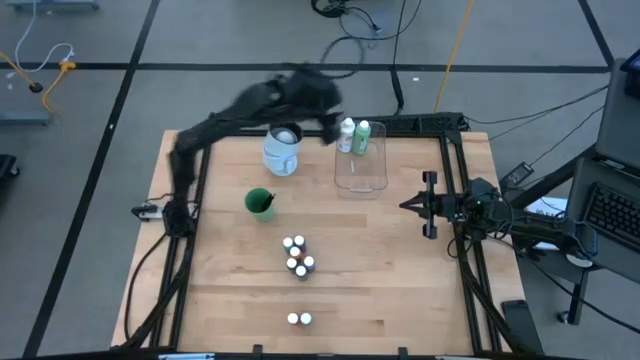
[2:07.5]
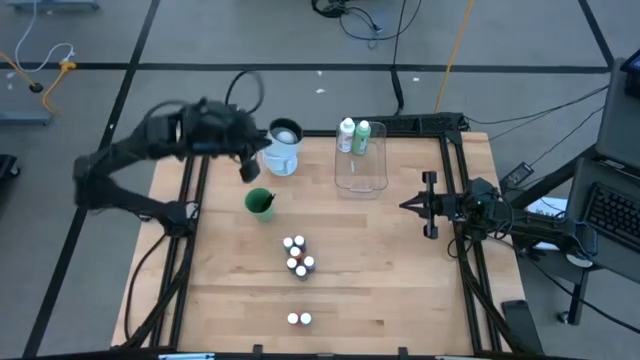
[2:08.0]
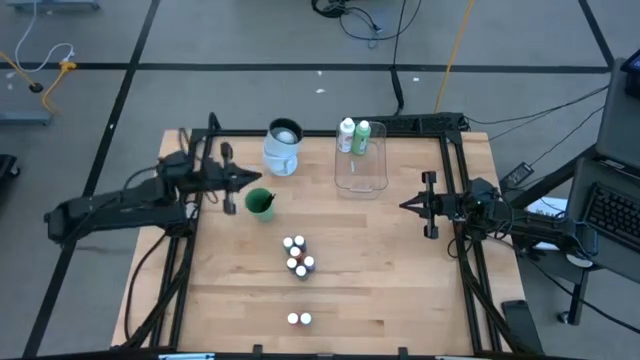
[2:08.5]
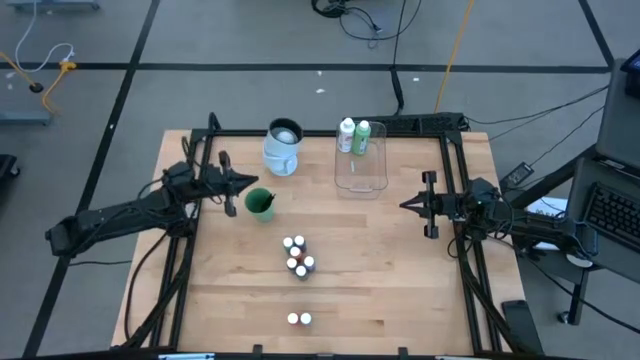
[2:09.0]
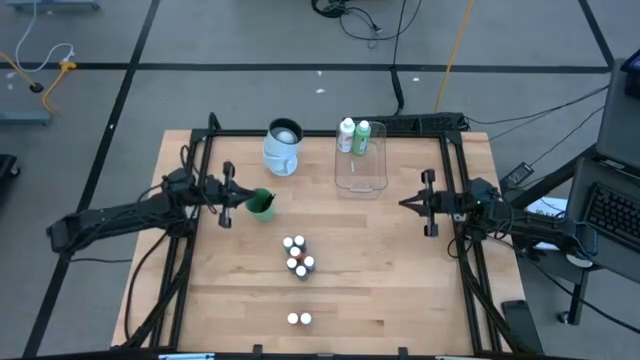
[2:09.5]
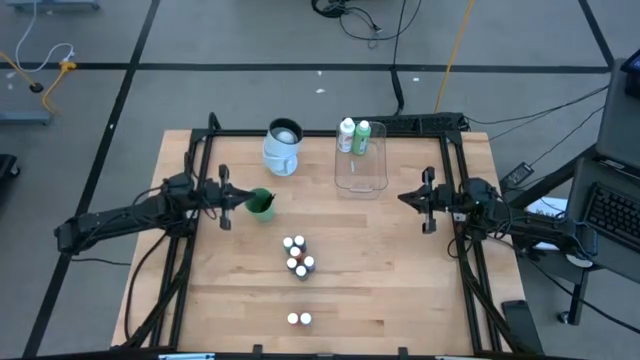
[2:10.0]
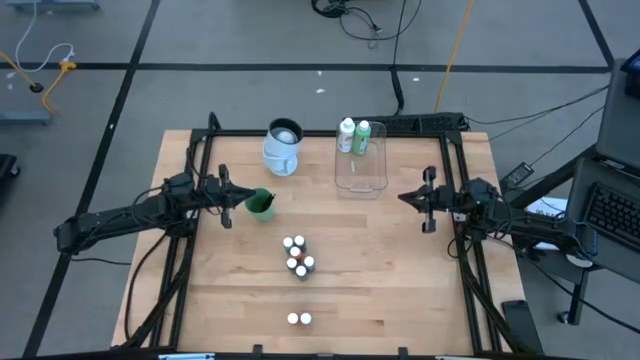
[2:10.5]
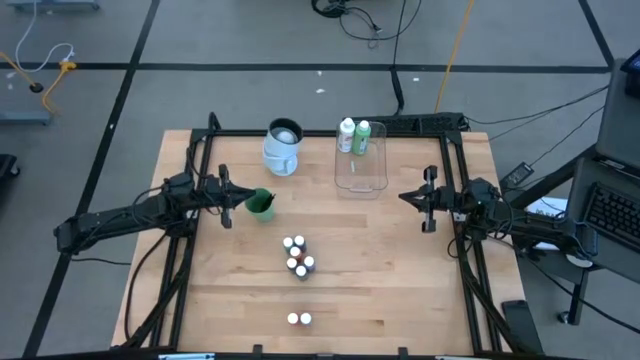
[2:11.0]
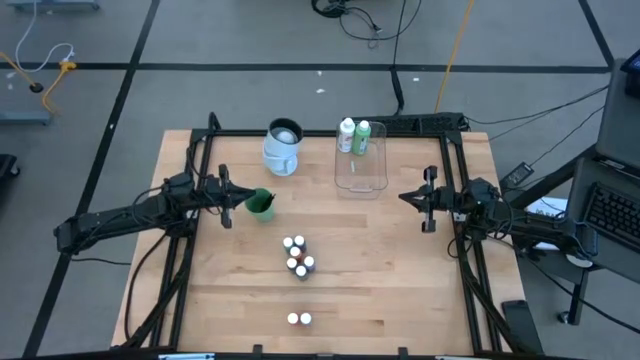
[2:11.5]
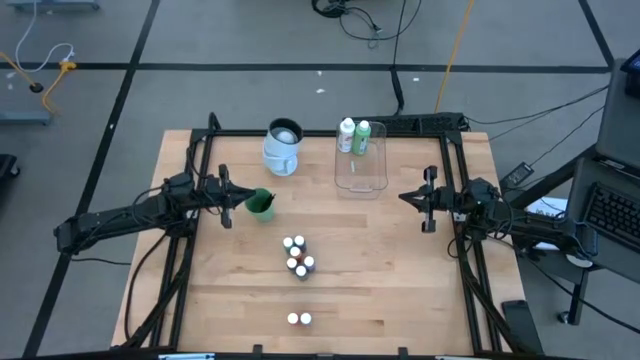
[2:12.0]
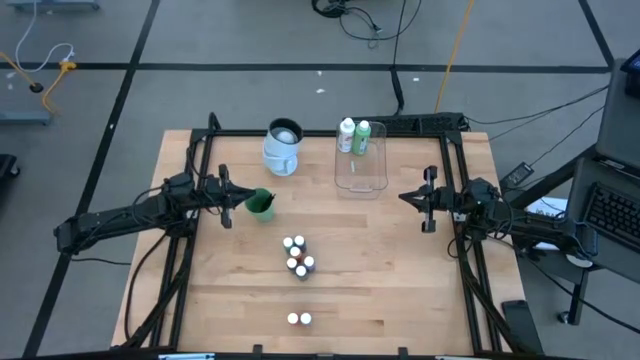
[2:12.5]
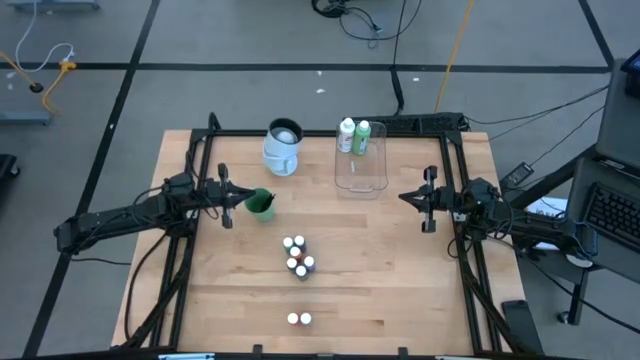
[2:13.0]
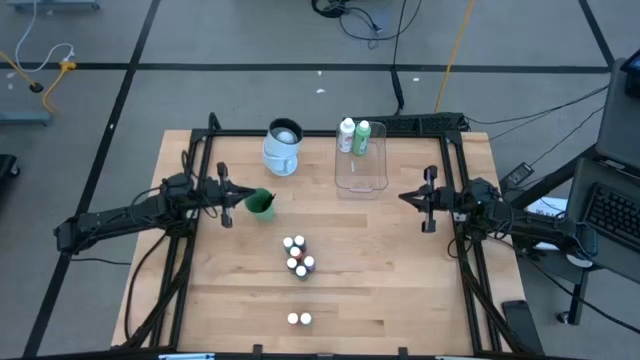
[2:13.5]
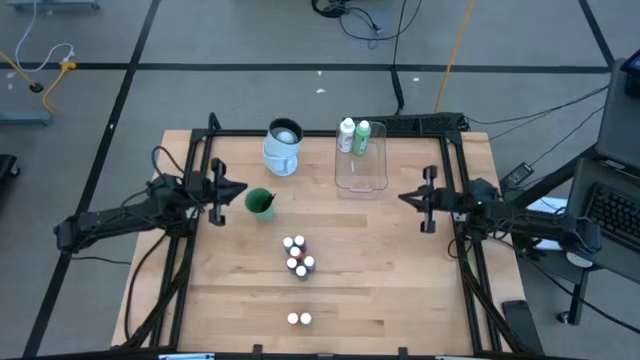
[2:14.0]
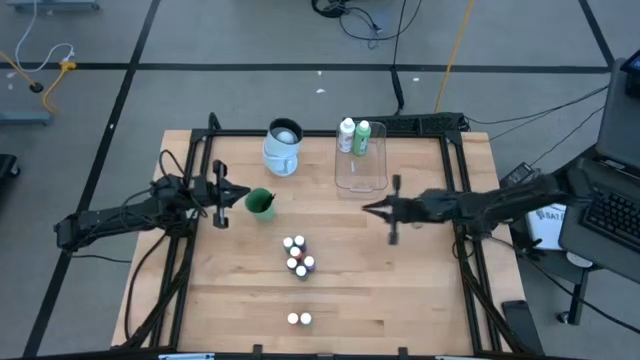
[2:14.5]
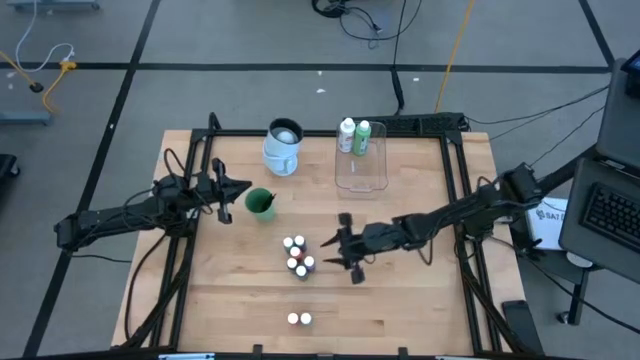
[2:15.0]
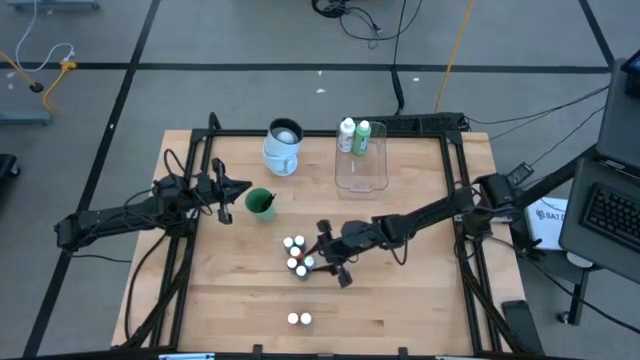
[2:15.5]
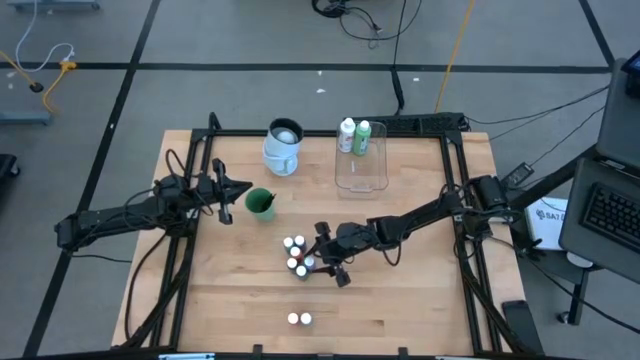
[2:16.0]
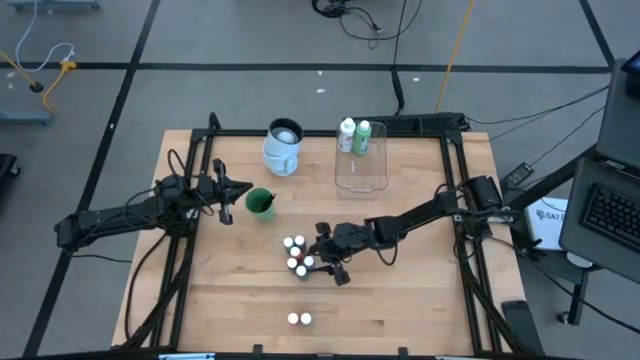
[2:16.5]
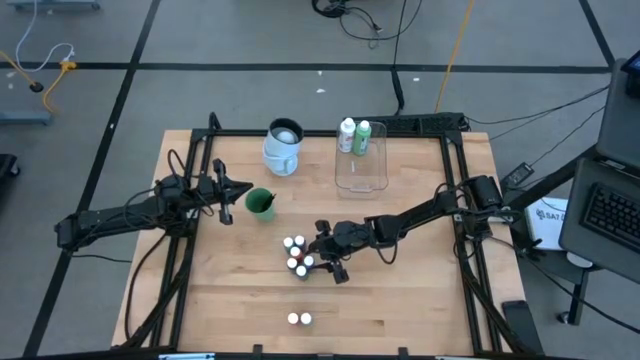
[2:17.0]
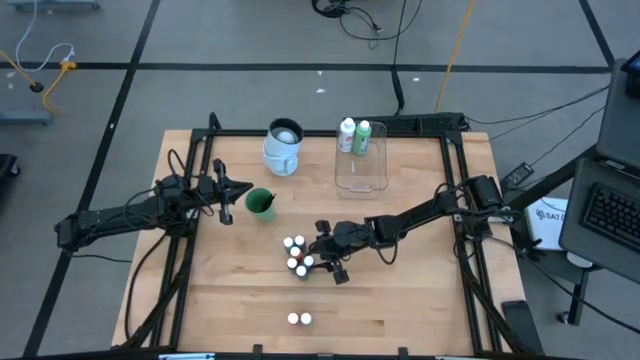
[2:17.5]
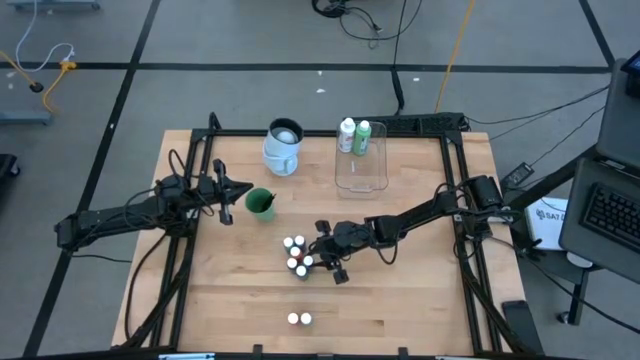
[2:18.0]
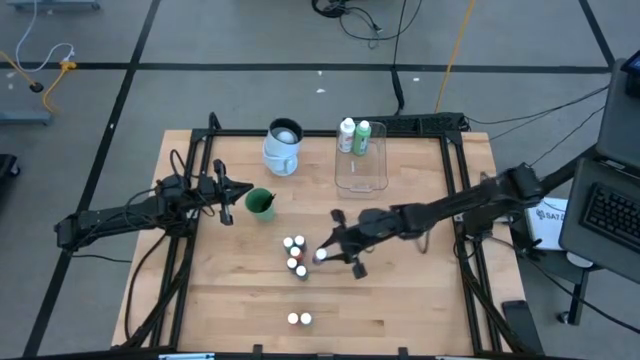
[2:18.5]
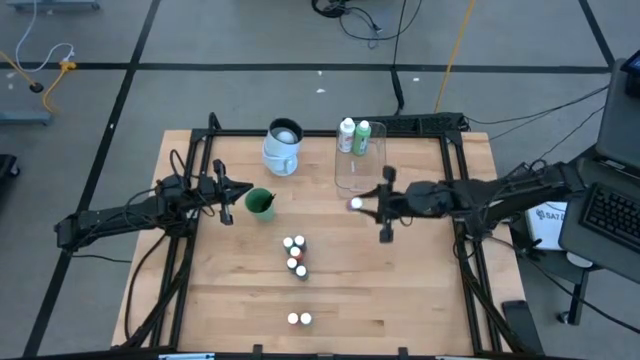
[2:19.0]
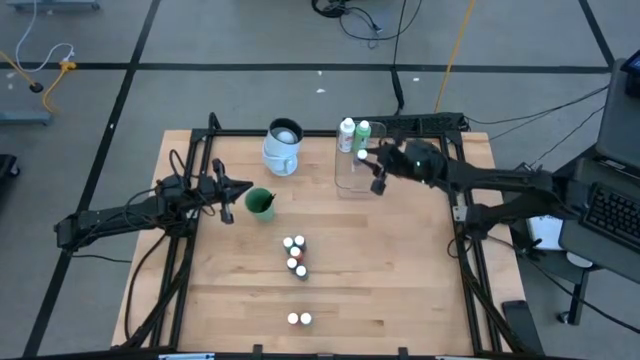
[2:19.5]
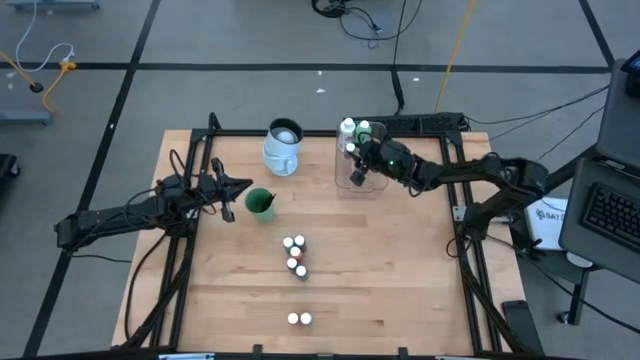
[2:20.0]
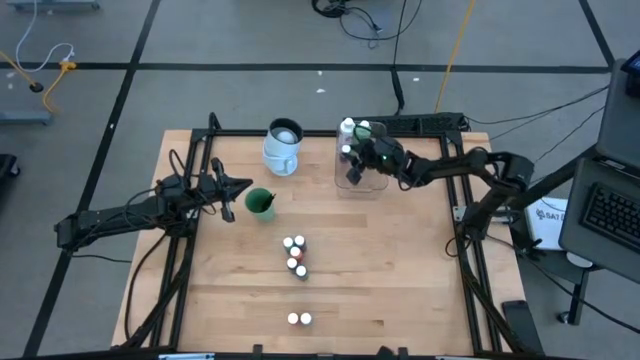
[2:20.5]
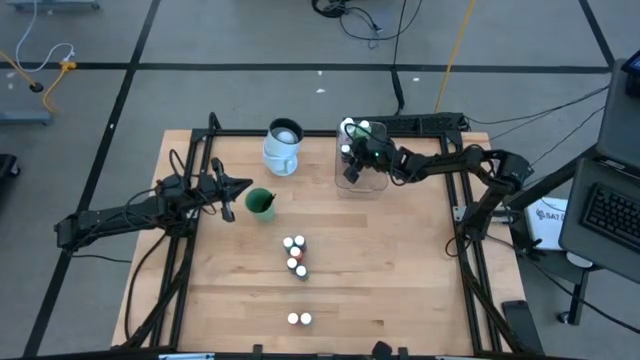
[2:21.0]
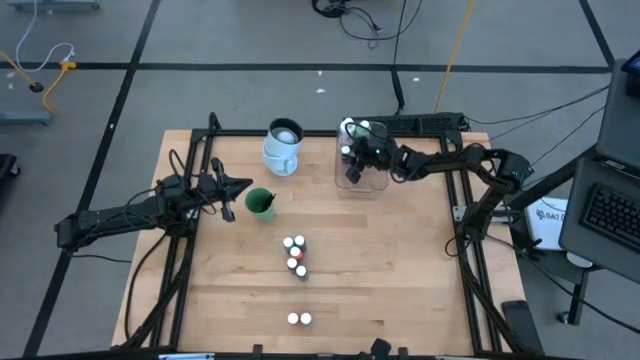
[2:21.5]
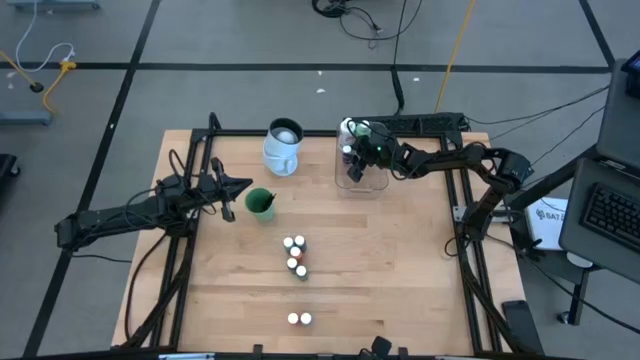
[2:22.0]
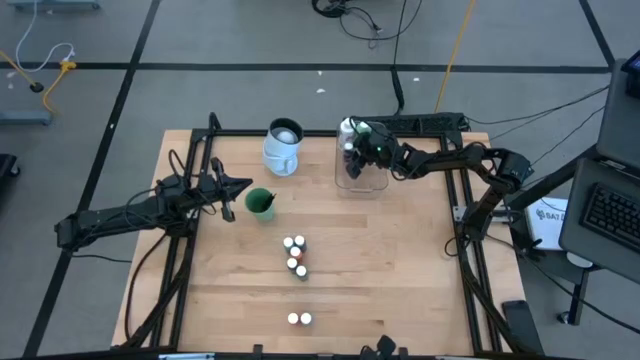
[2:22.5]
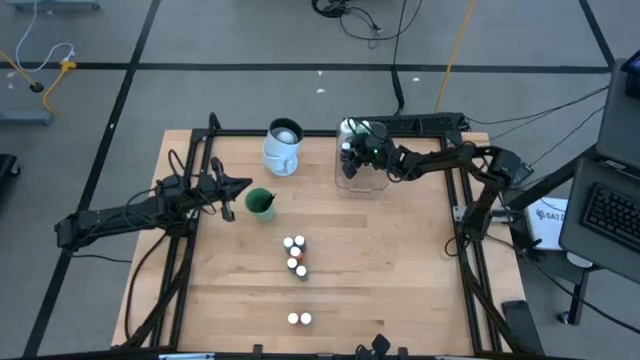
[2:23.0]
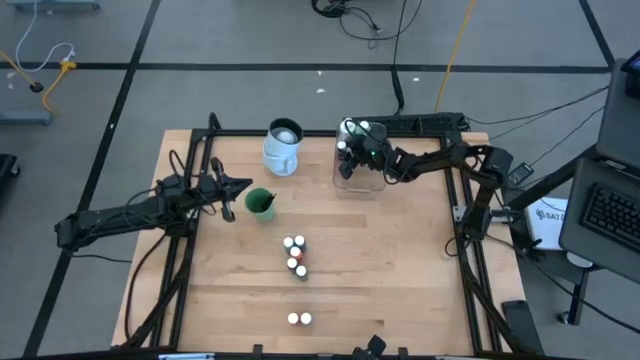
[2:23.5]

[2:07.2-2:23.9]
Task: Pick & Place Paint Supplies
Put the purple paint bottle into the transparent bin

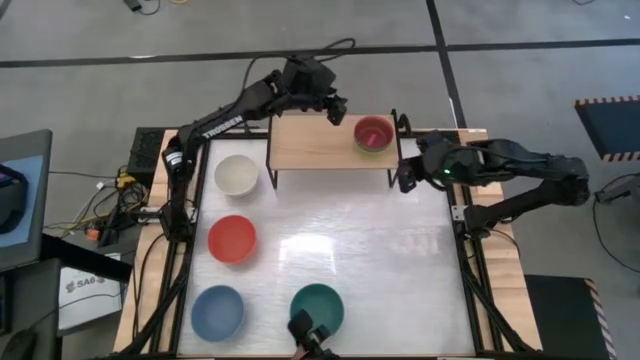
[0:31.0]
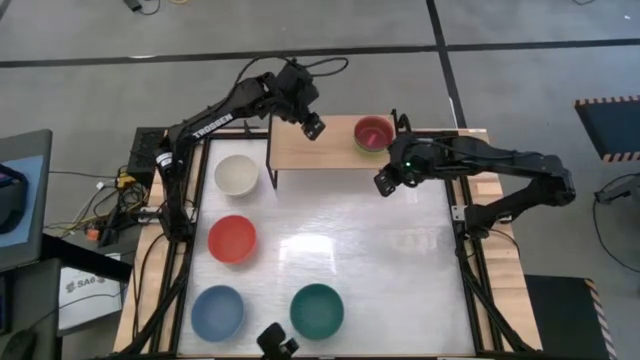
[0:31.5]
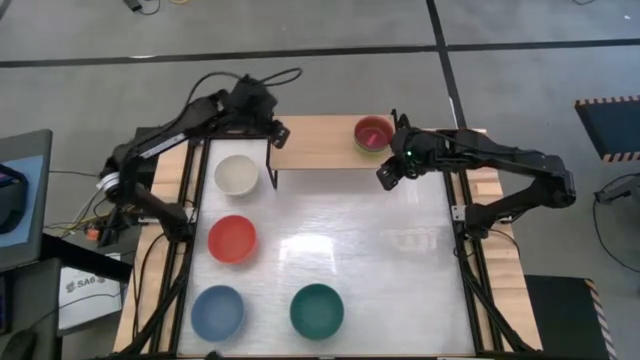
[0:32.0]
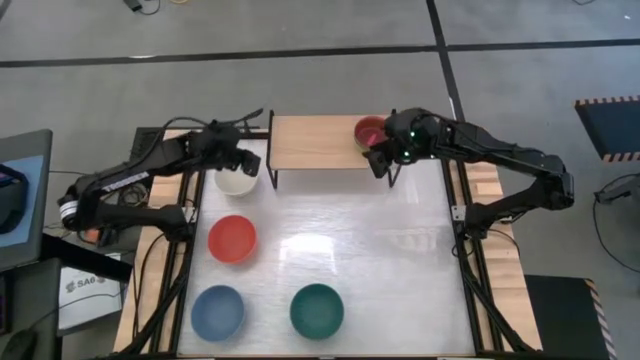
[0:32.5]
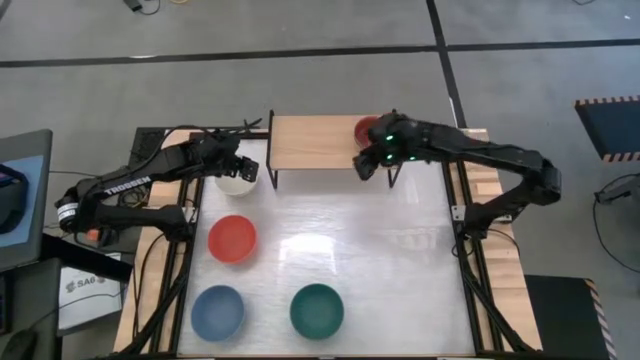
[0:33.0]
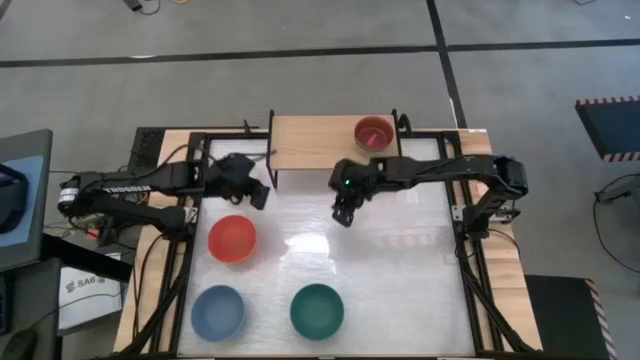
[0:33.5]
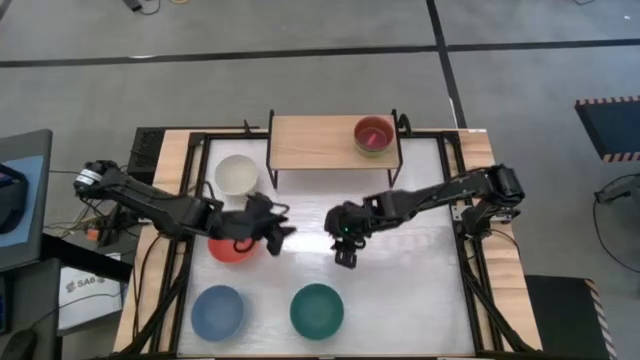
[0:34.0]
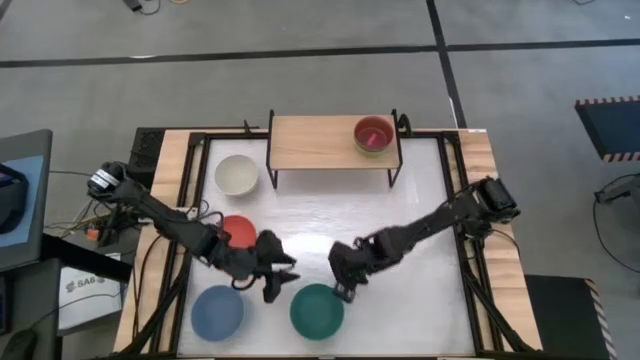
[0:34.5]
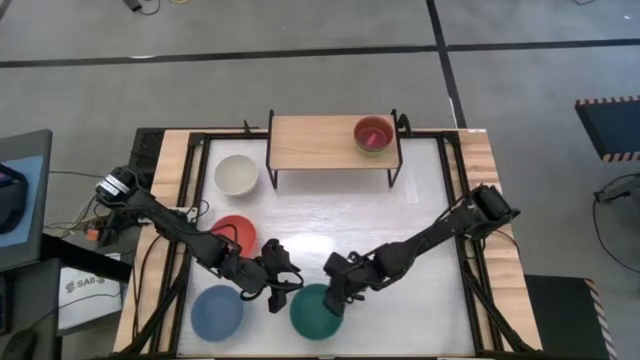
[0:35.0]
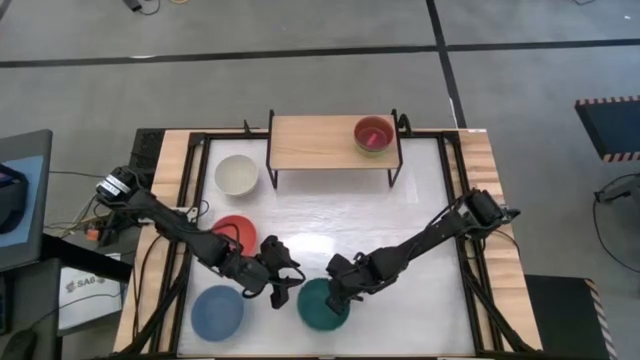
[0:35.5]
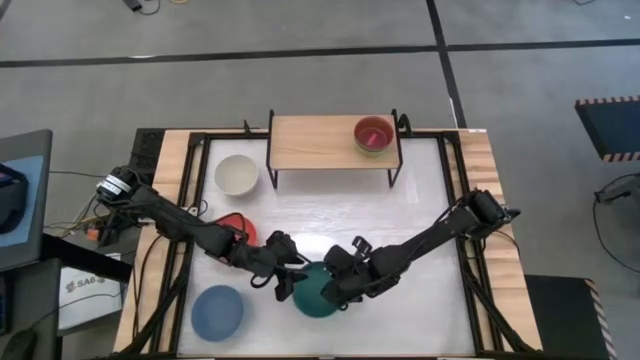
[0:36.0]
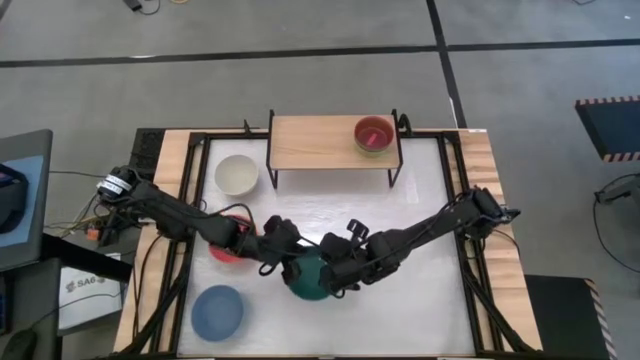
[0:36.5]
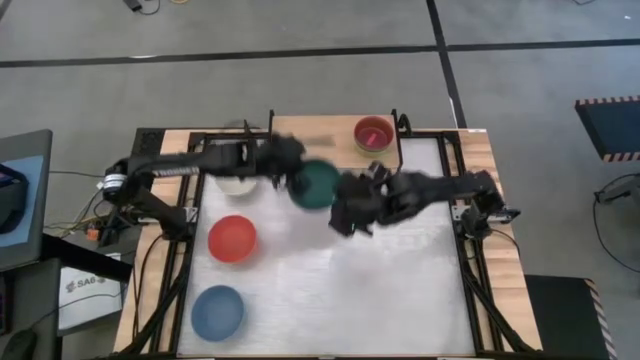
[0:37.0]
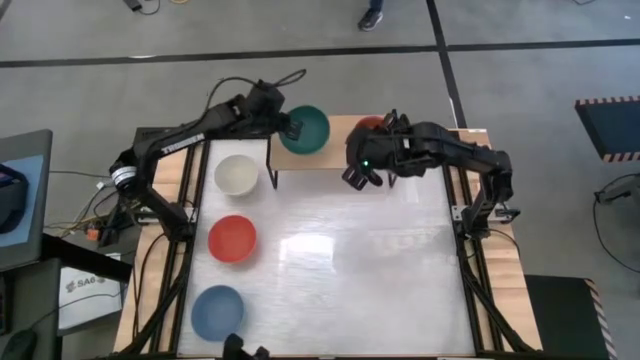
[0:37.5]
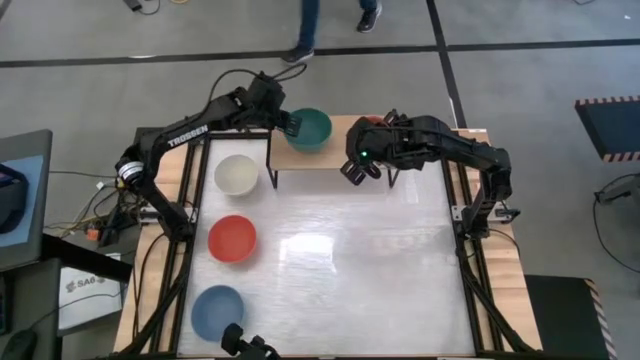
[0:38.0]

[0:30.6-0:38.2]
Task: Place and stack bowls onto a shelf
Put the dark green bowl on the shelf
